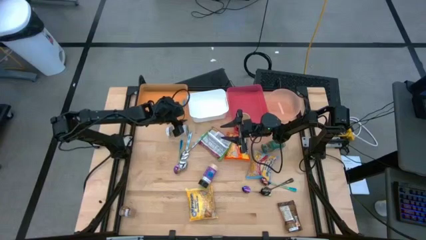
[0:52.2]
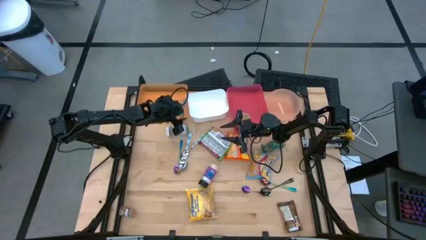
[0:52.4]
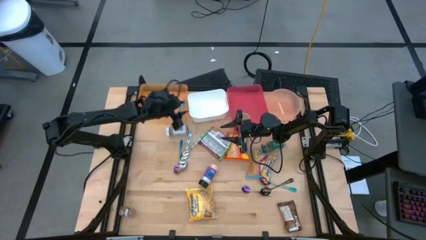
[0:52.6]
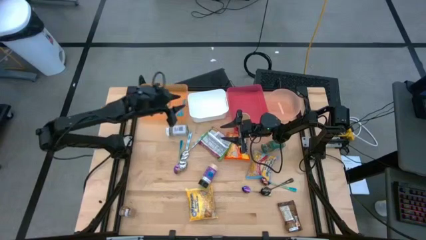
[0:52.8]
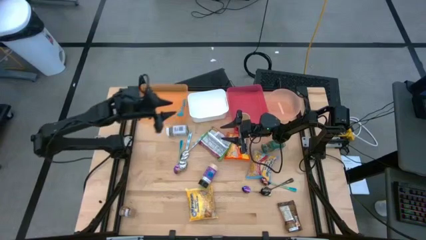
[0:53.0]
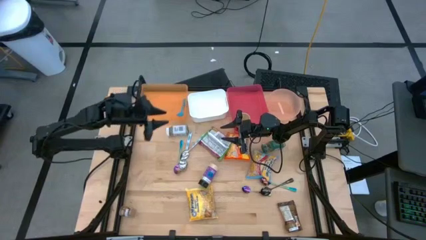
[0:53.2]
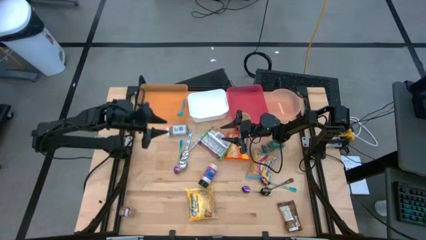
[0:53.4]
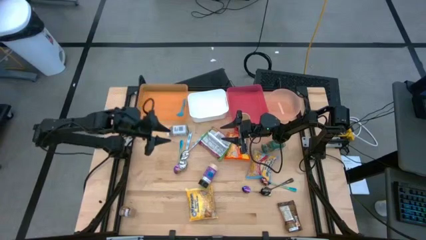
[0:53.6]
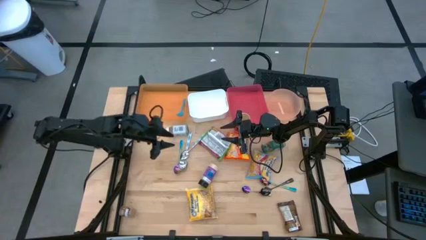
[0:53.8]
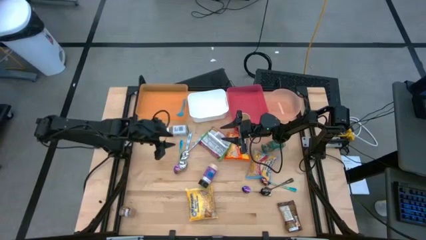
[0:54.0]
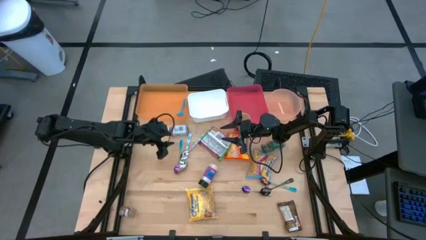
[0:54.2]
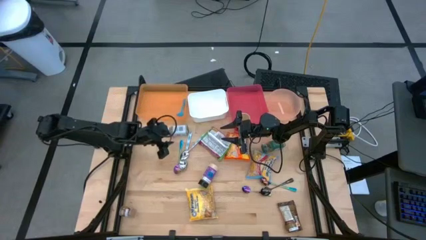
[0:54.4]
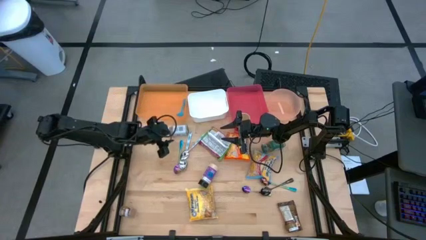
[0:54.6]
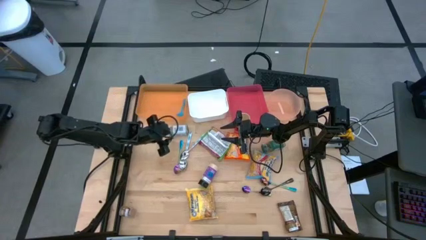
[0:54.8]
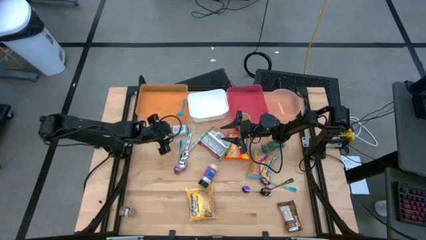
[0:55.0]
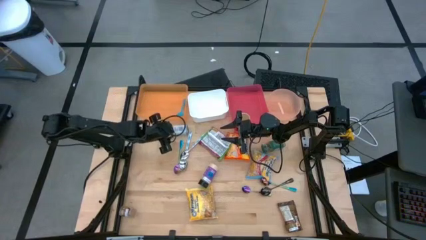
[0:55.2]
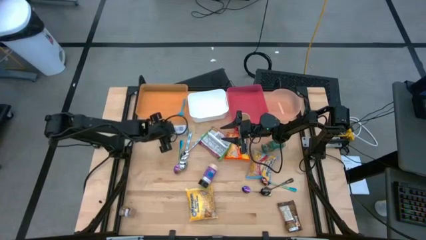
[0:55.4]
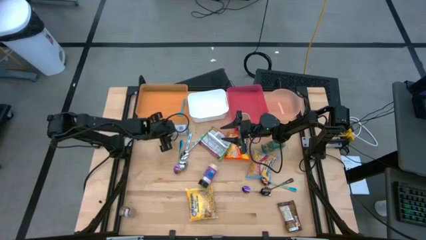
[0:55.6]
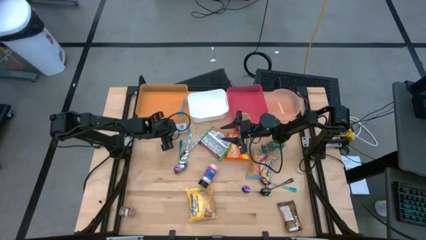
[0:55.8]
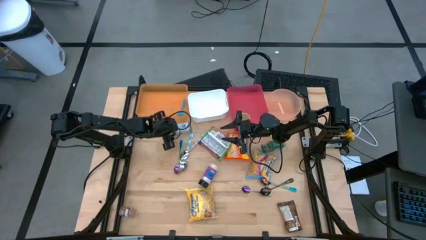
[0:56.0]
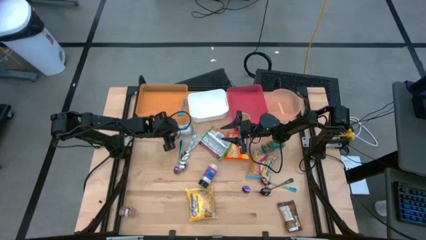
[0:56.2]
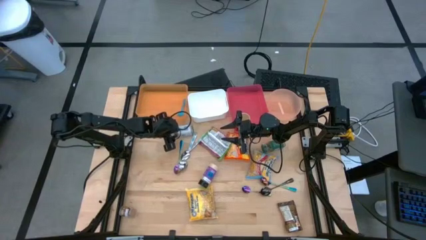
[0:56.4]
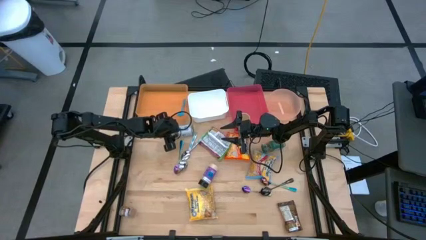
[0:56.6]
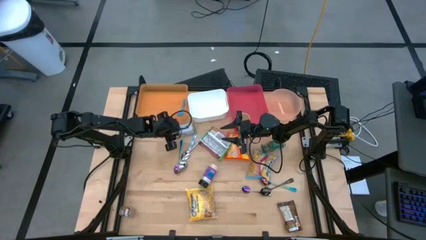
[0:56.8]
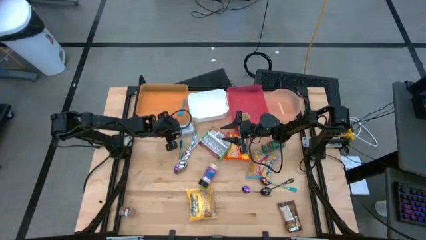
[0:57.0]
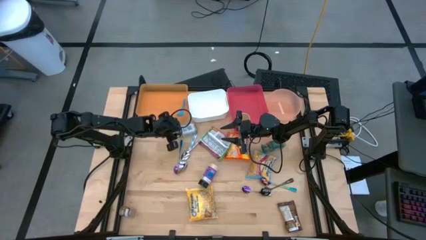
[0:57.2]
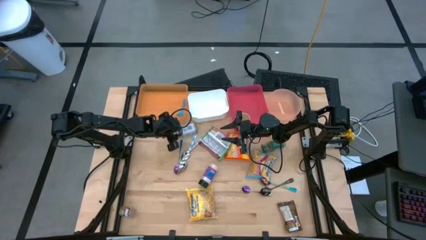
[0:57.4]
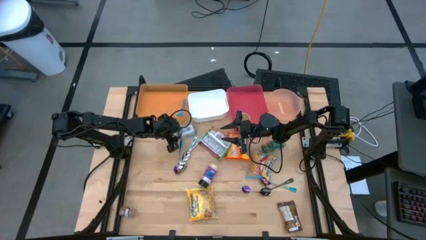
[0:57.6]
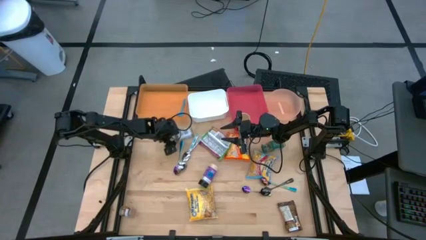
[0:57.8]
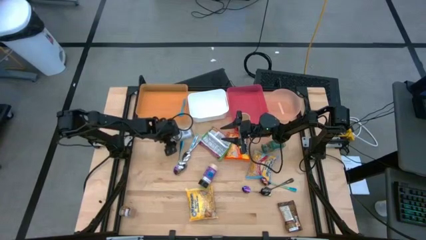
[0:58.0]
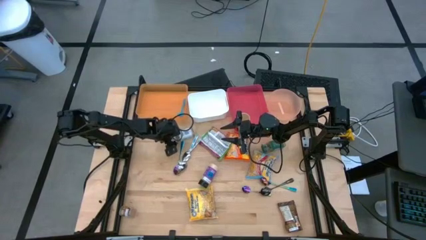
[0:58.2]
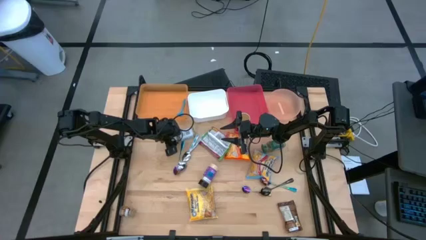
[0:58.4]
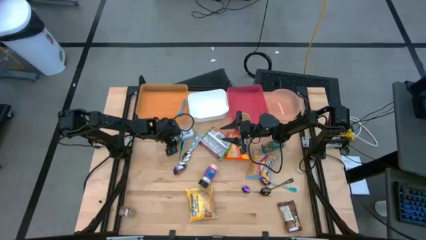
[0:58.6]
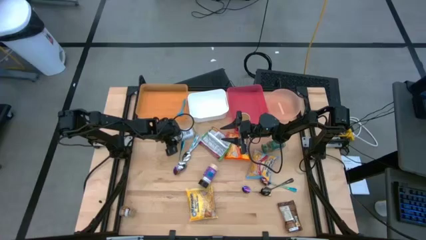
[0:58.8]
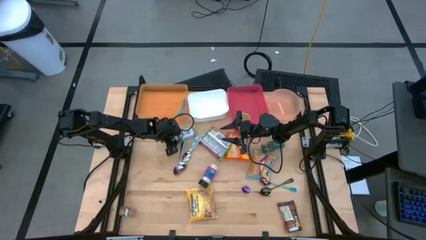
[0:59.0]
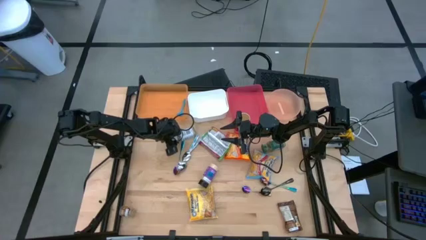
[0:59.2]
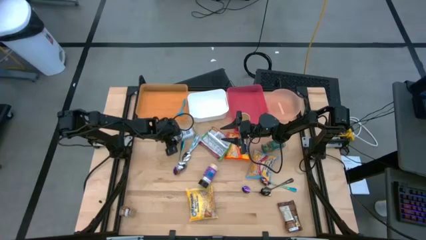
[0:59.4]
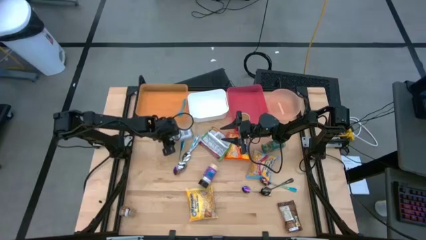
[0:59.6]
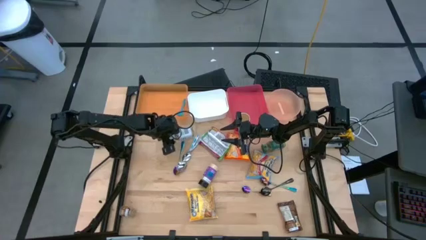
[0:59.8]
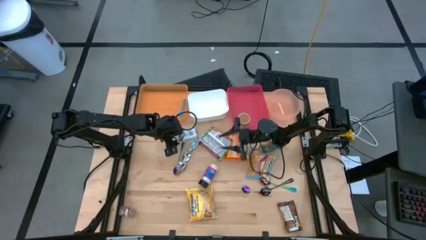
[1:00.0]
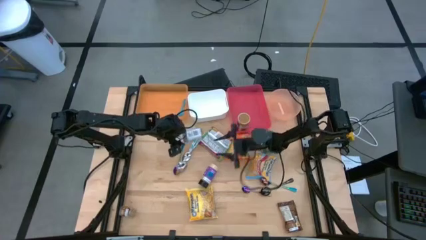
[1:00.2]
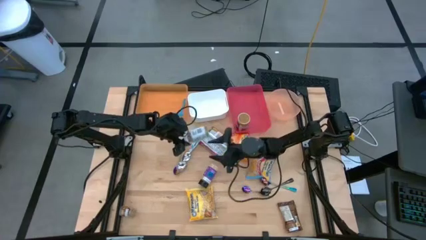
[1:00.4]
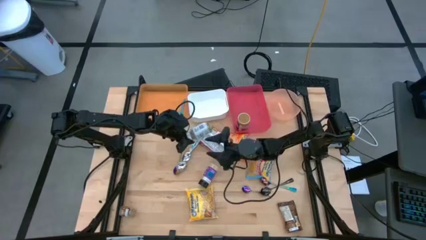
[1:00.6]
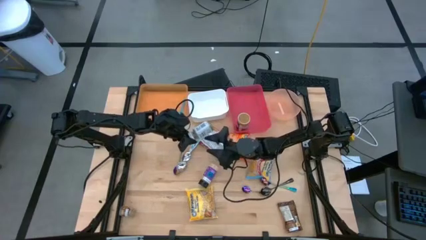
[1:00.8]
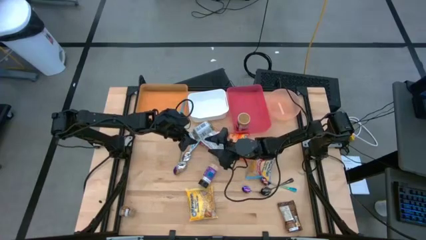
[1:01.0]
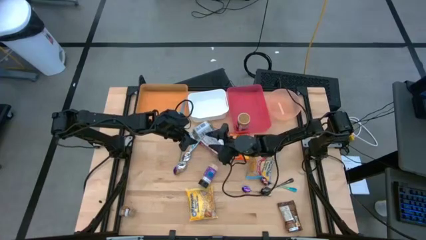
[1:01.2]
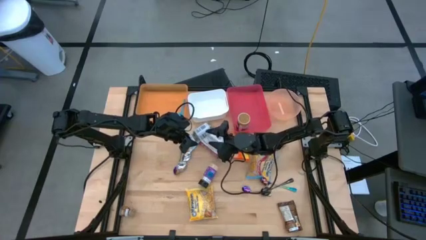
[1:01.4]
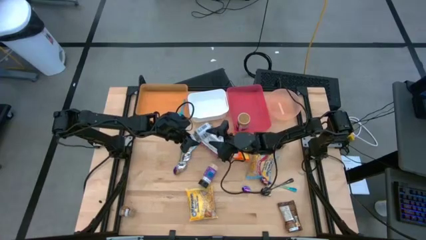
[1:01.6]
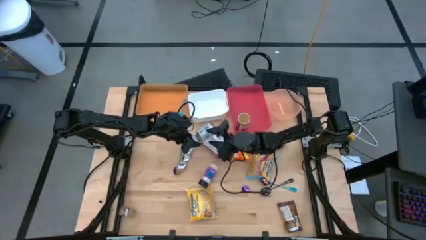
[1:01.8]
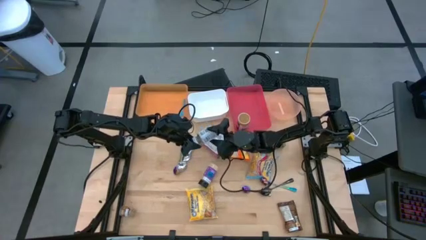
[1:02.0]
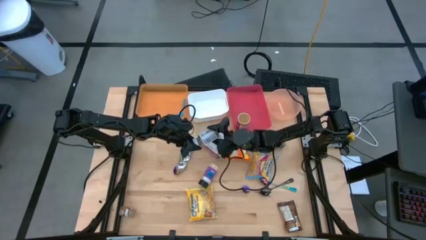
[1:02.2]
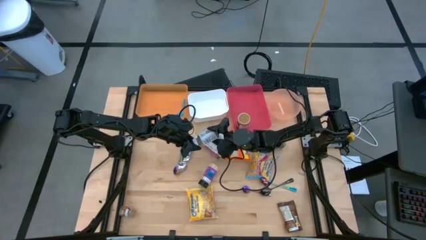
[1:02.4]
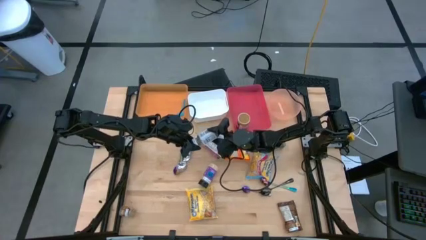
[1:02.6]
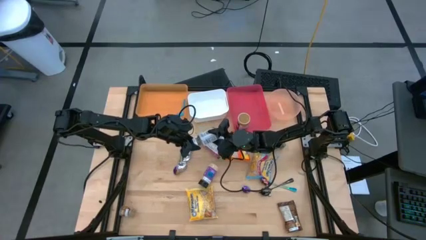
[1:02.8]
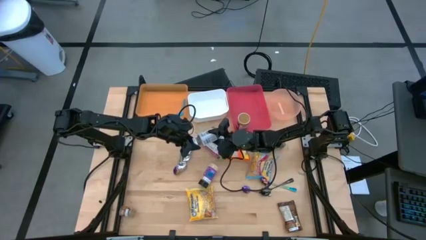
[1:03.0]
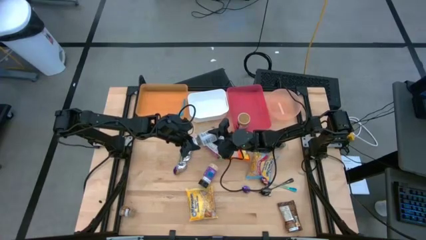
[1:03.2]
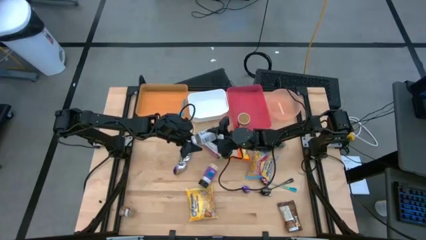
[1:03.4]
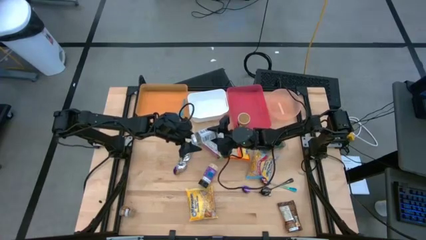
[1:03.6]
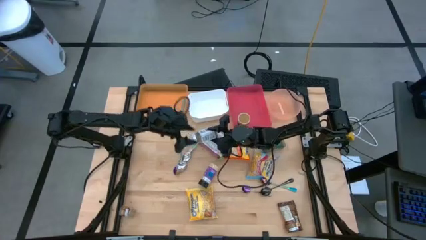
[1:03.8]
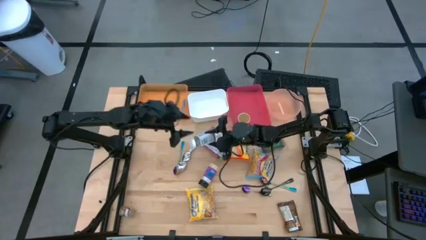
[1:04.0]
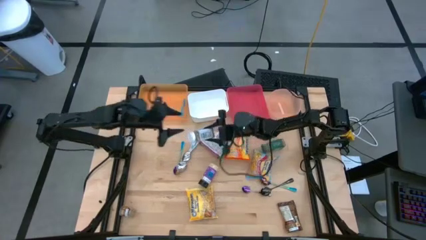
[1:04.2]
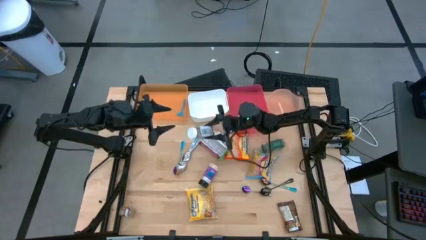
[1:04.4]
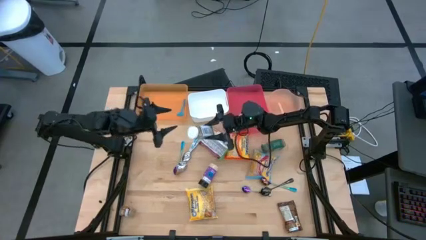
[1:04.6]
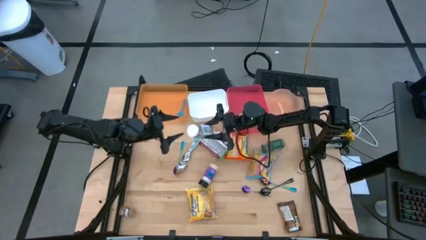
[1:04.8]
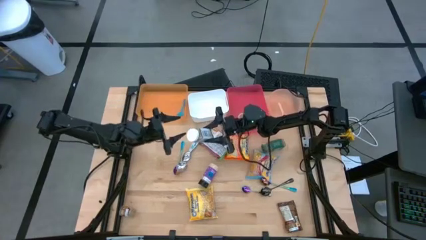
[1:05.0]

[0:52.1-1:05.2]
Task: Pick & Place Food Item
Put the white seasoning bottle into the pink bin
